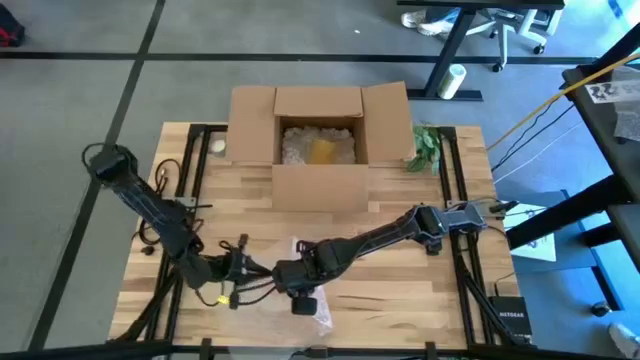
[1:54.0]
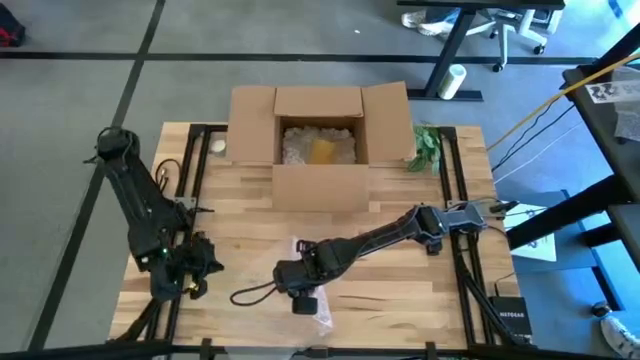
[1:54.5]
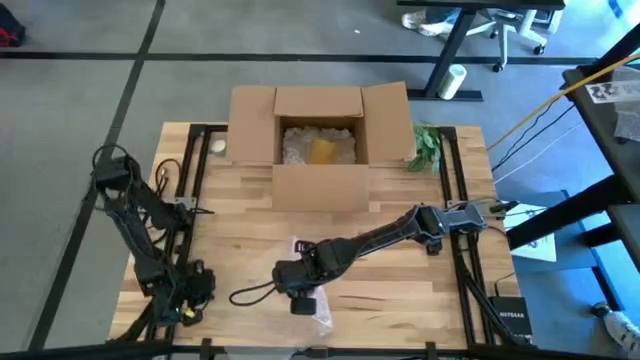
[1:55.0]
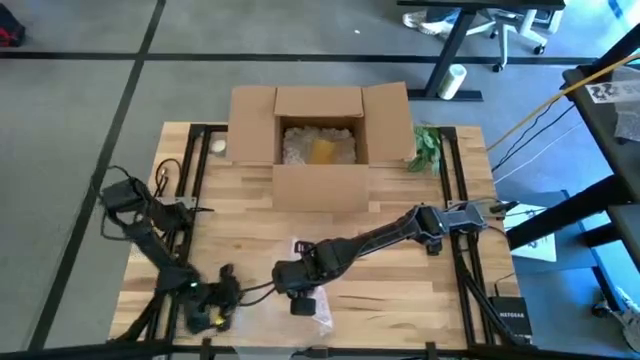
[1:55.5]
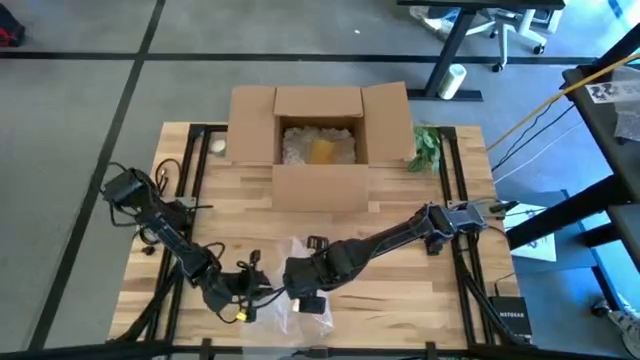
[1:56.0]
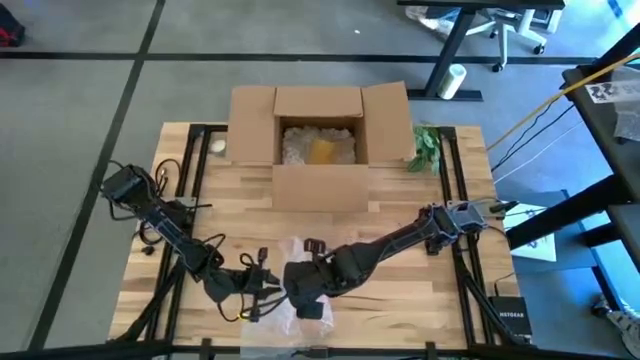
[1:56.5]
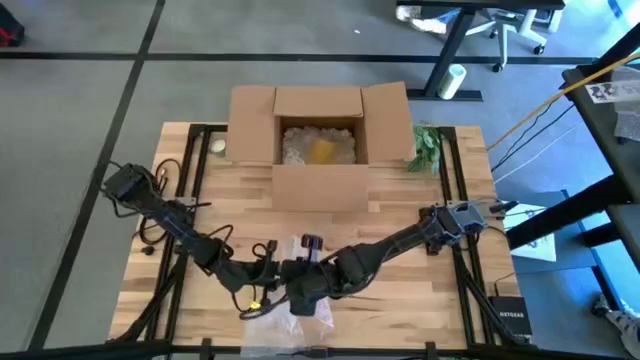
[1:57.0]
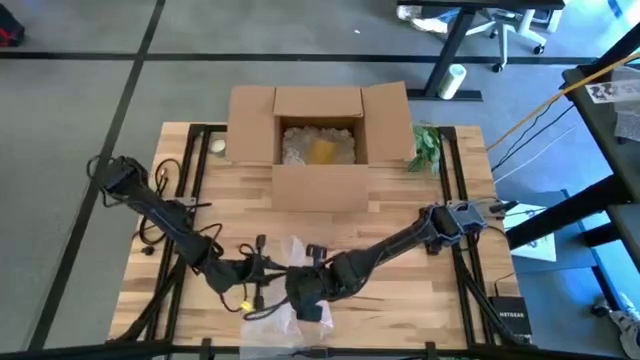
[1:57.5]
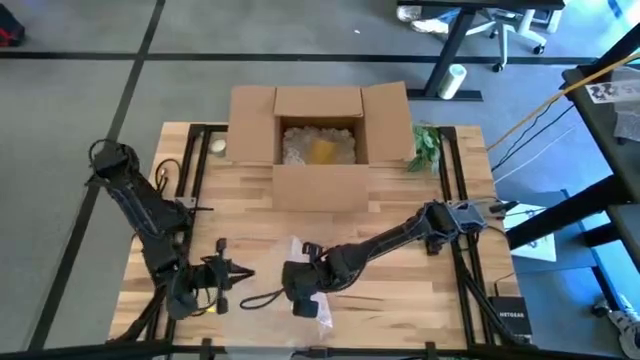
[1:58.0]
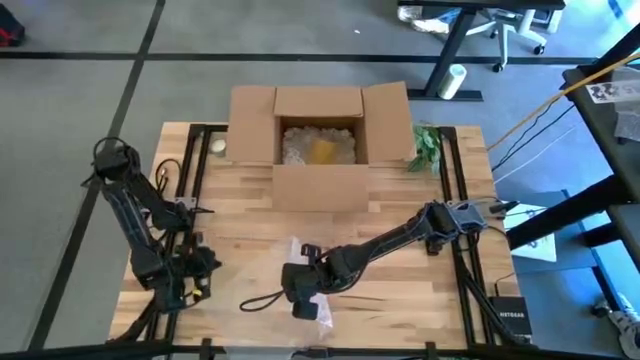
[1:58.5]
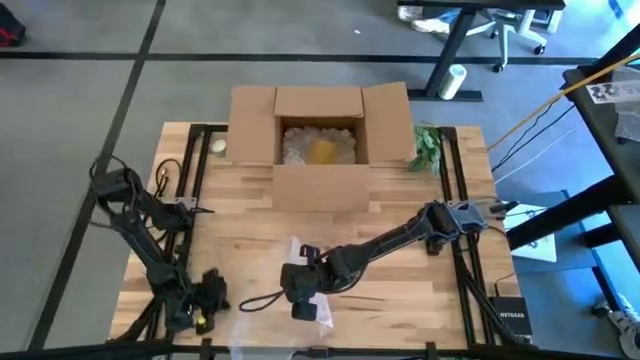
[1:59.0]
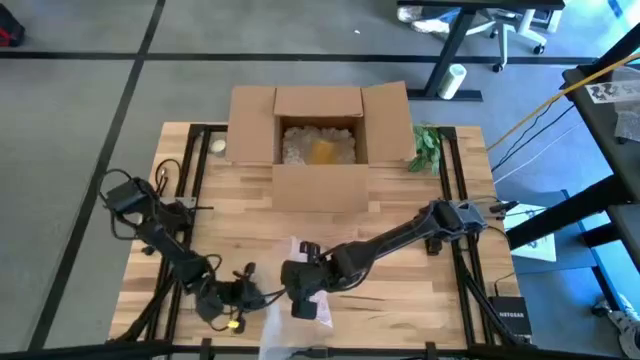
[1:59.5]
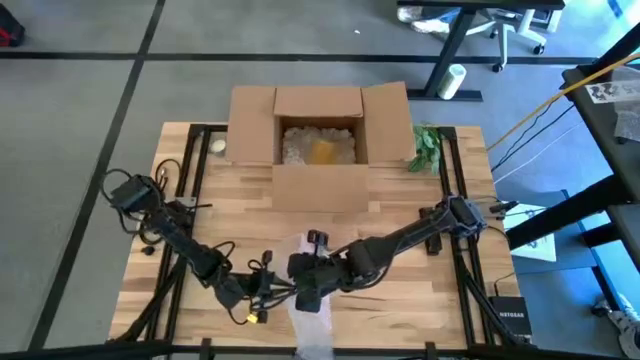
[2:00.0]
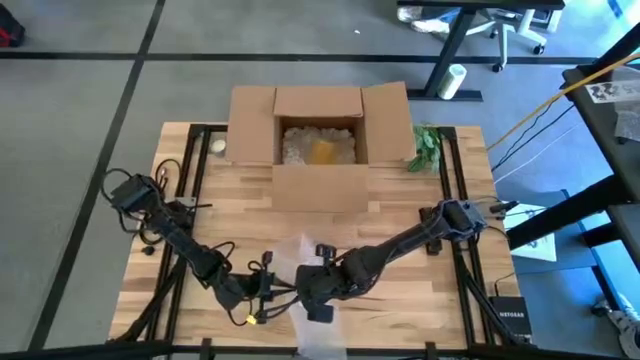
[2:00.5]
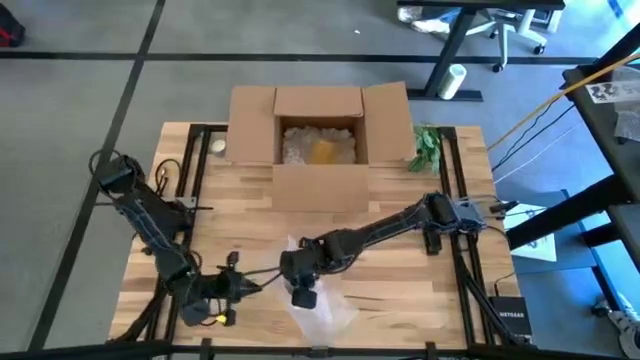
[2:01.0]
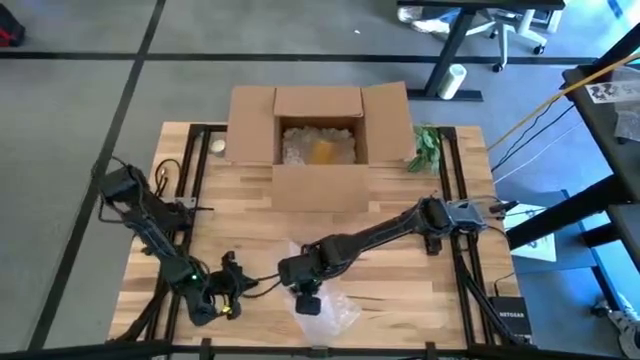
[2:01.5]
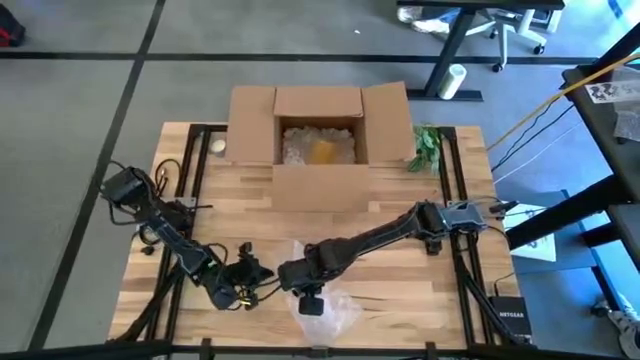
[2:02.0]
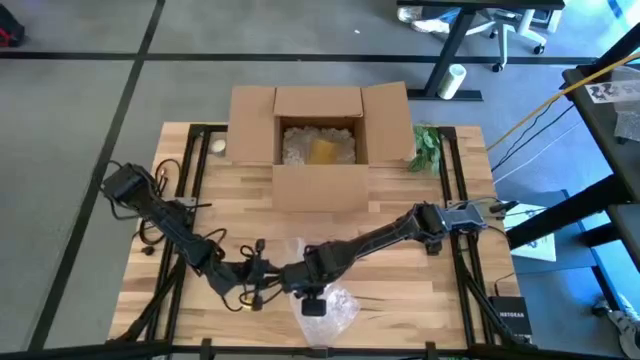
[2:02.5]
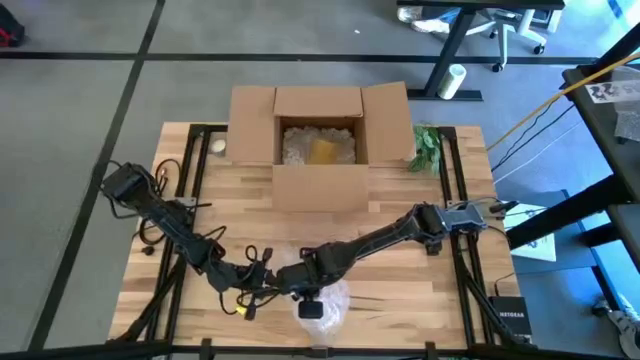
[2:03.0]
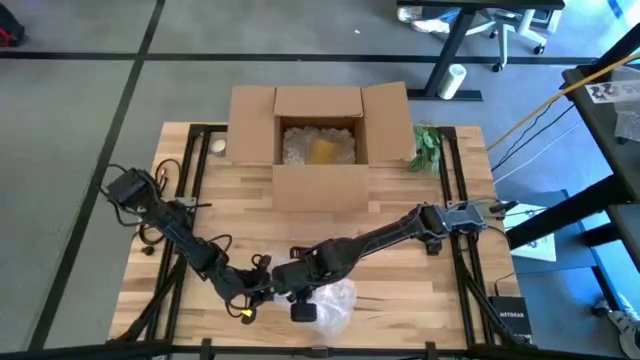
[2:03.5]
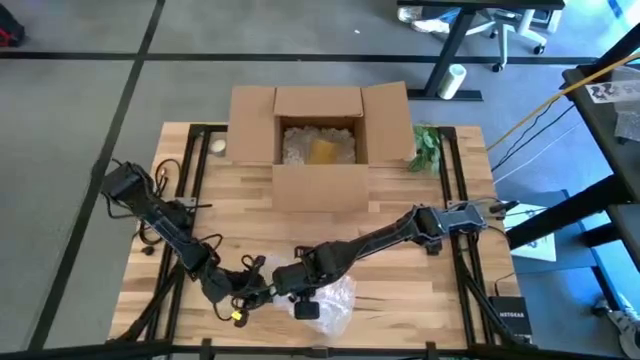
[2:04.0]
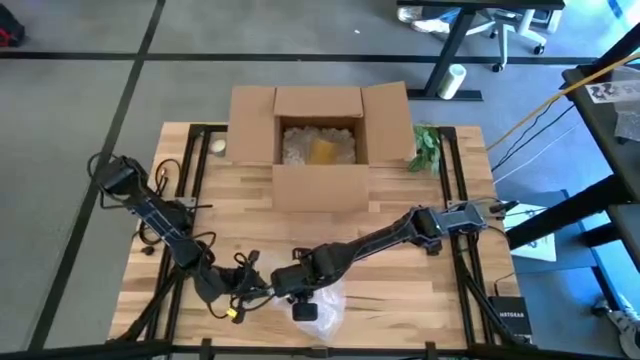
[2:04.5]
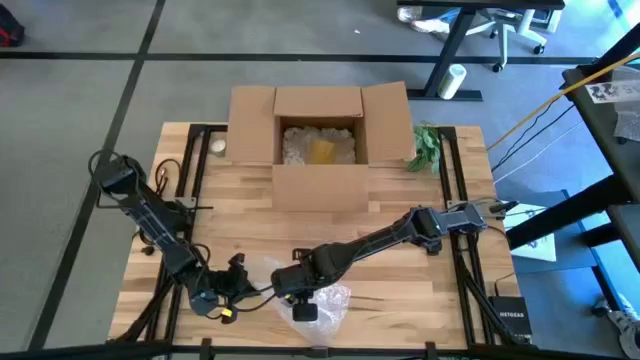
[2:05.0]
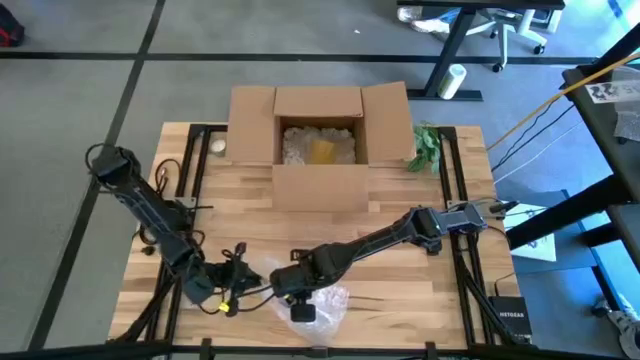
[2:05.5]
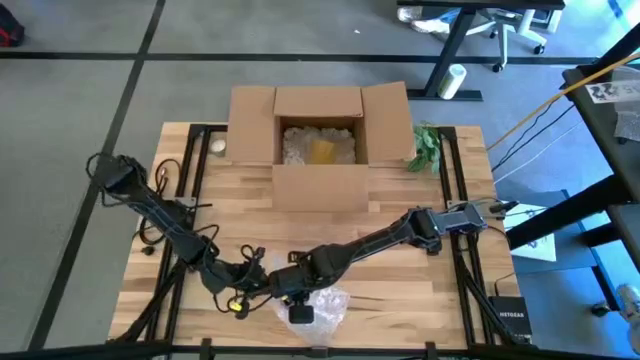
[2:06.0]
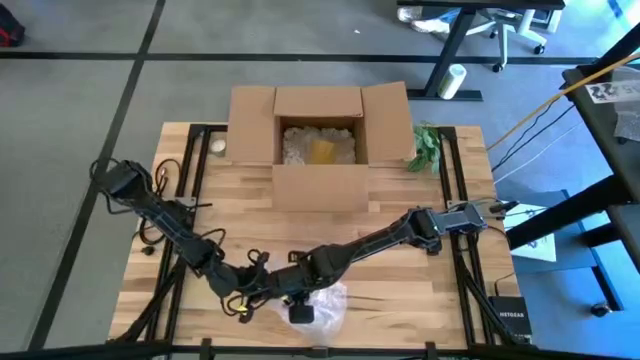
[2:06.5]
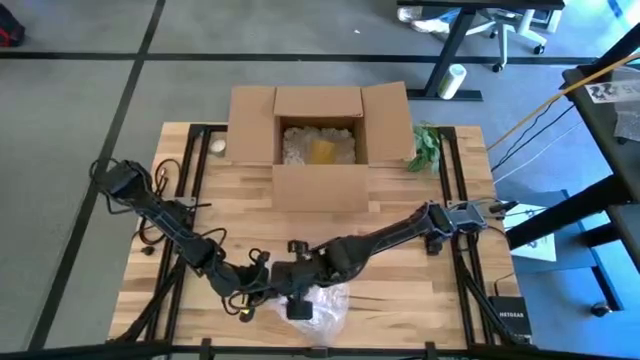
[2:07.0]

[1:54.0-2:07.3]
Task: wrap mug
Wrap the red mug with the transparent bubble wrap

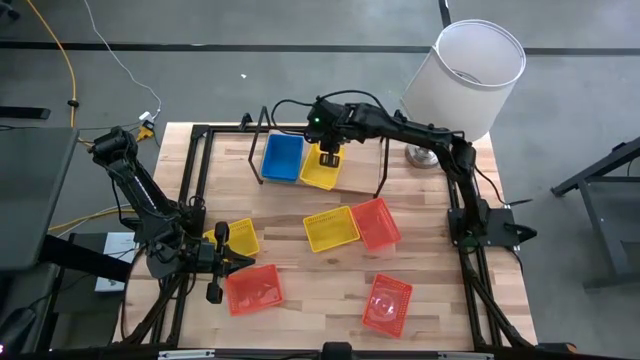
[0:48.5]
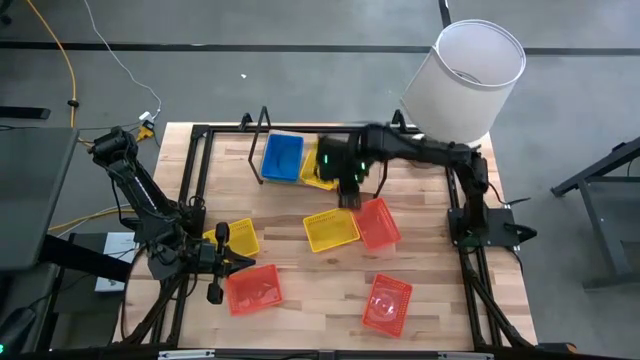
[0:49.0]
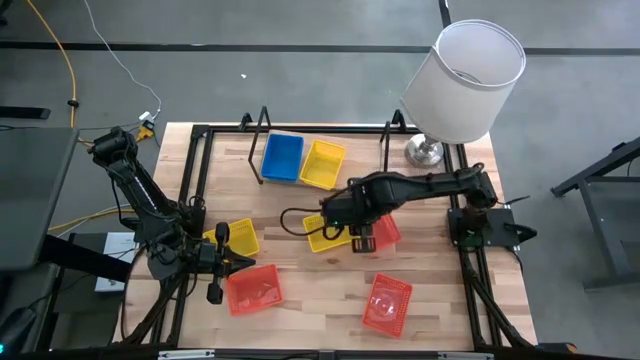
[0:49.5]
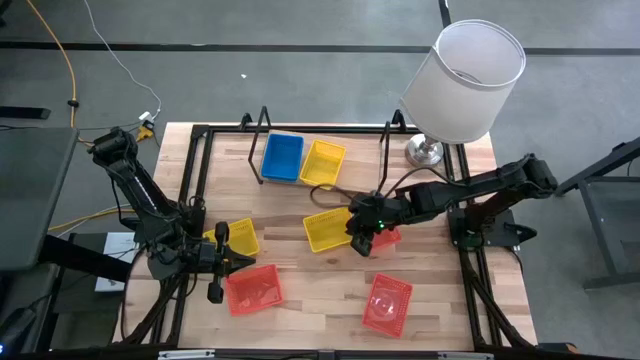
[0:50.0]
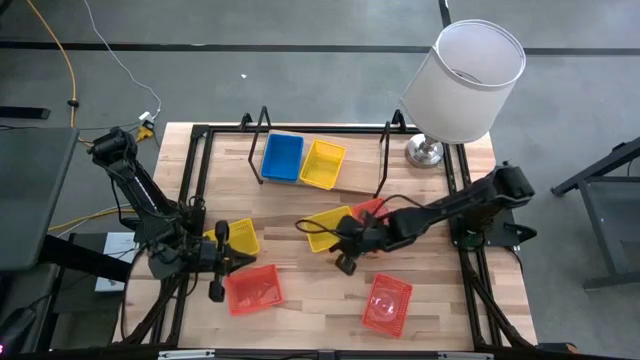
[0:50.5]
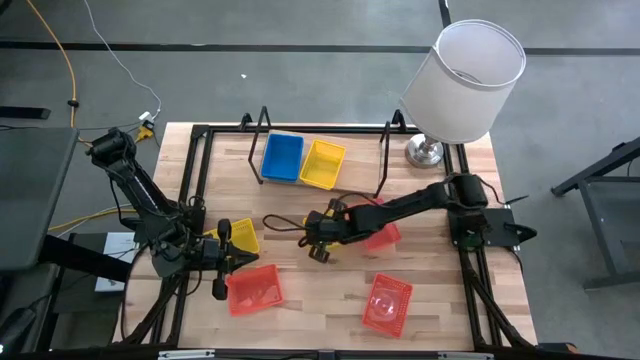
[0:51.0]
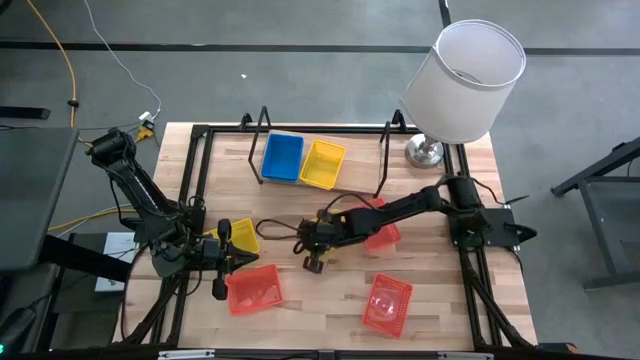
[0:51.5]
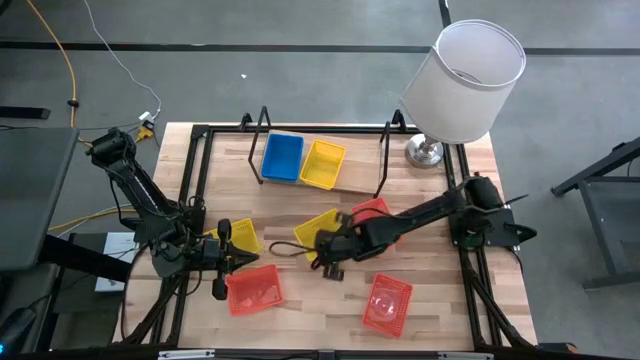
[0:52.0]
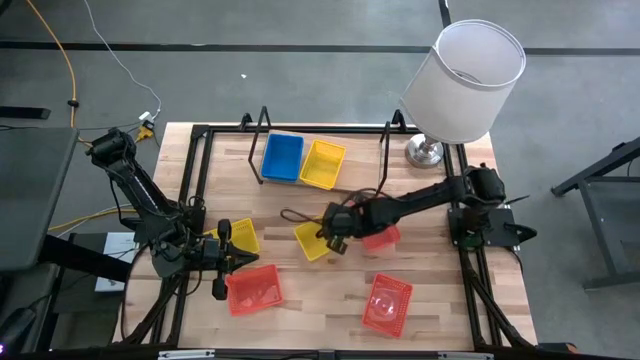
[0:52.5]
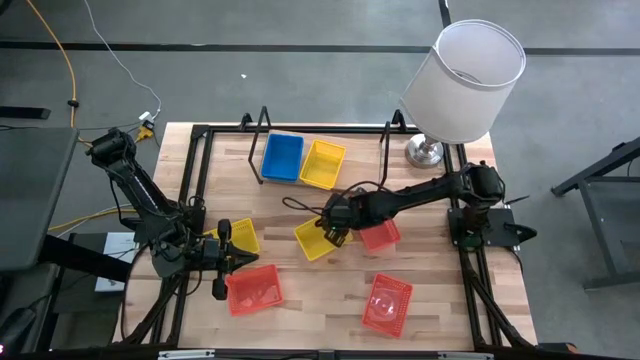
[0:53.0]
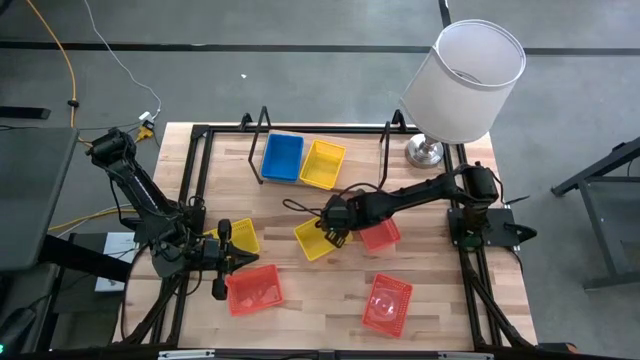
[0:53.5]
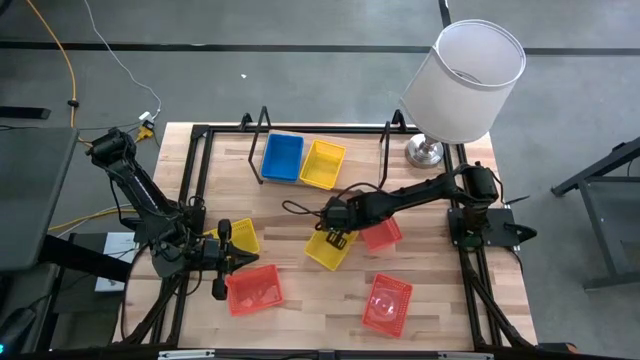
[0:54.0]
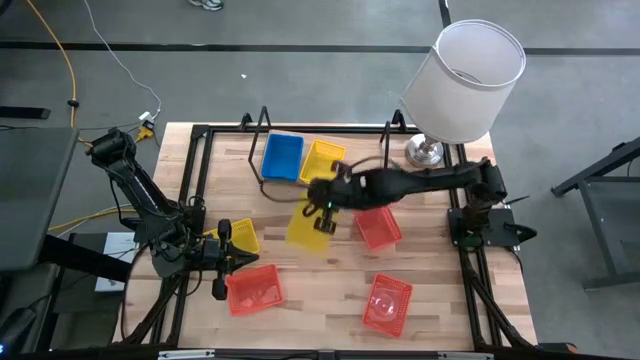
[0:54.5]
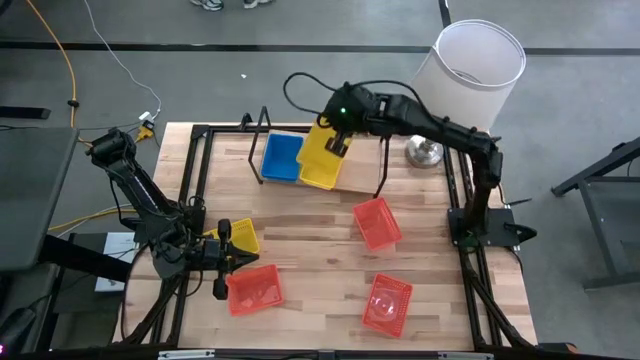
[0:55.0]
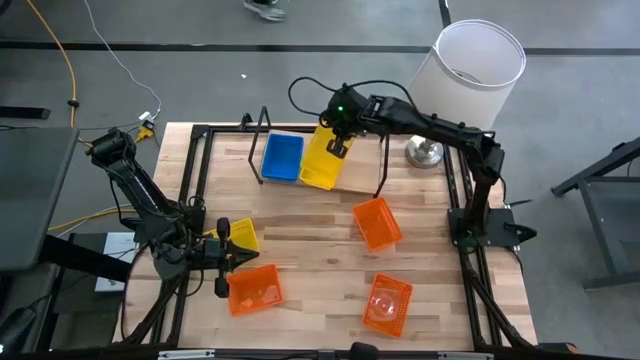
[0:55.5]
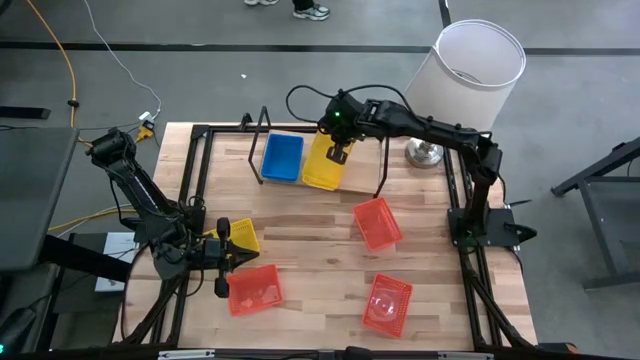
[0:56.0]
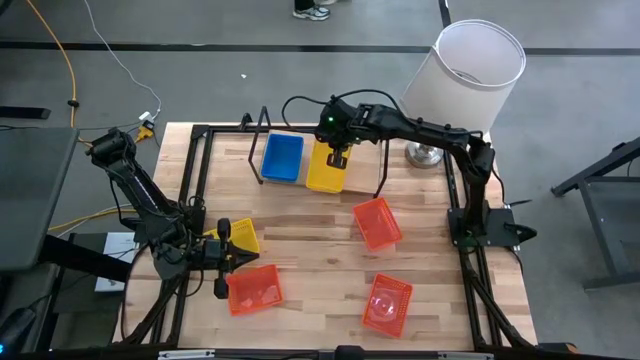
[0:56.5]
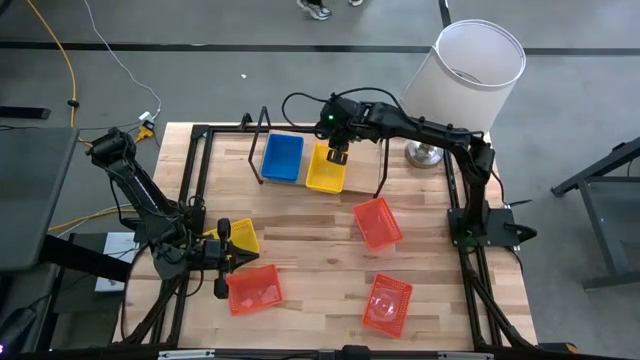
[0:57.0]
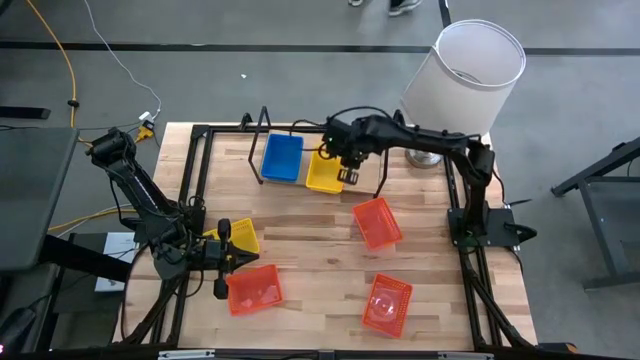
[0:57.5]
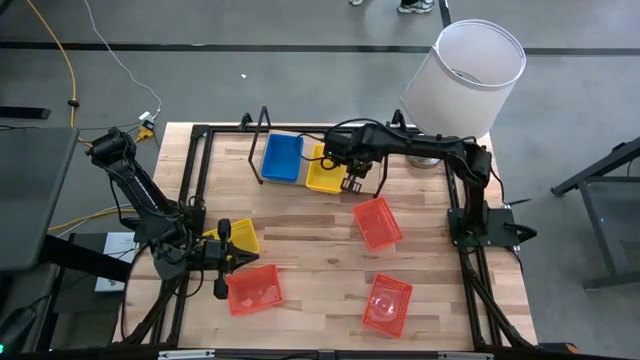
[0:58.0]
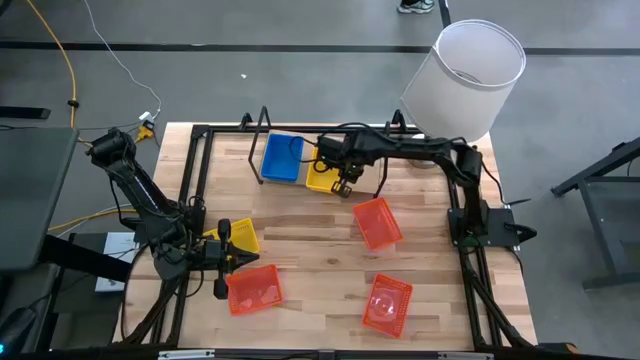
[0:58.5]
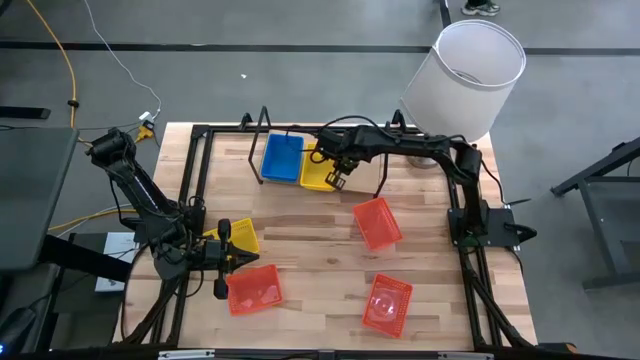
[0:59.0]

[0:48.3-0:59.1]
Task: Stack baskets on shelf by color
Stack the right yellow bin on the yellow bin on the shelf
